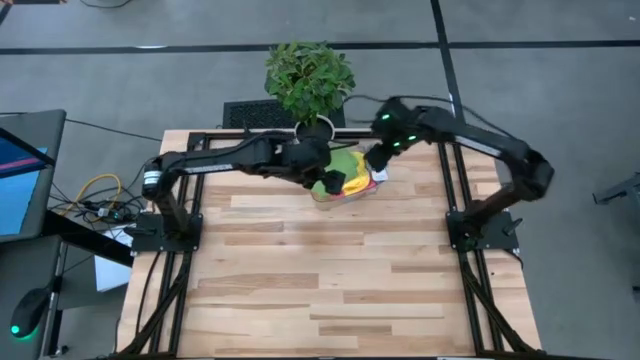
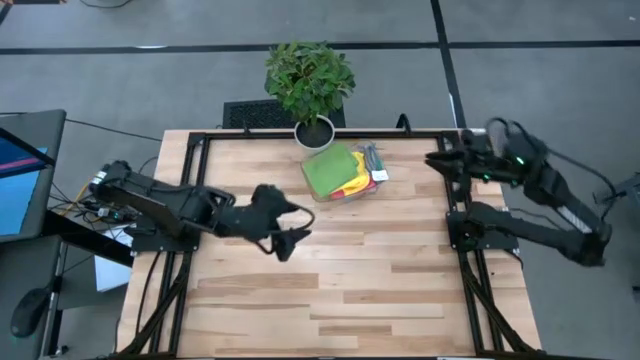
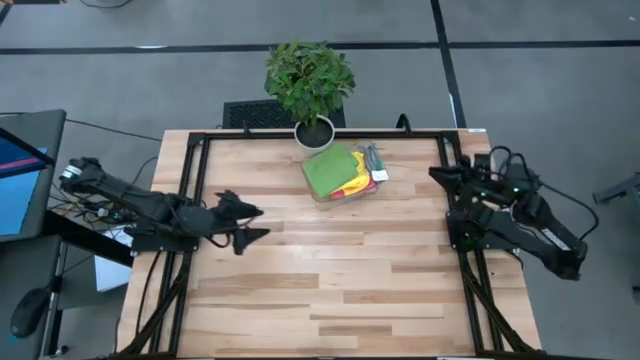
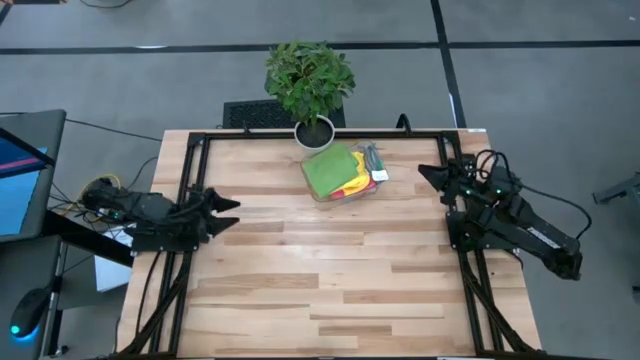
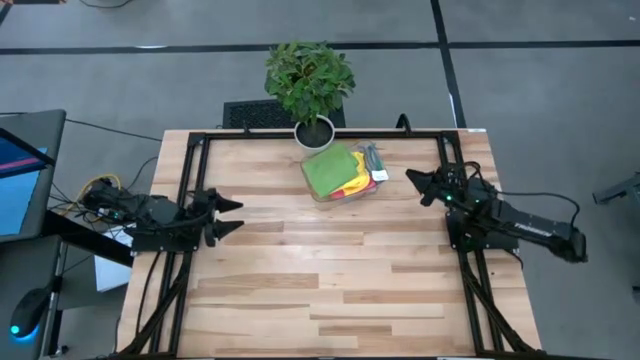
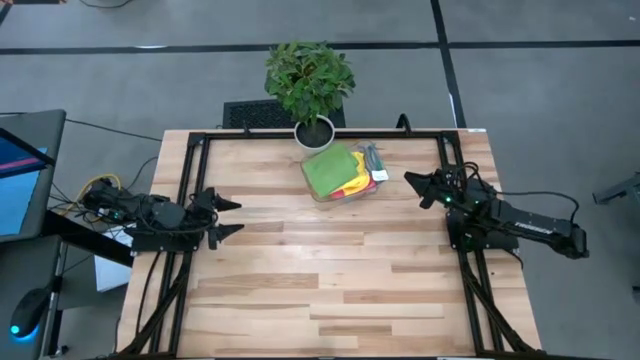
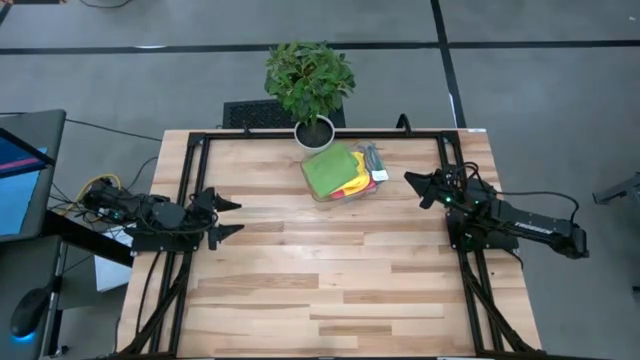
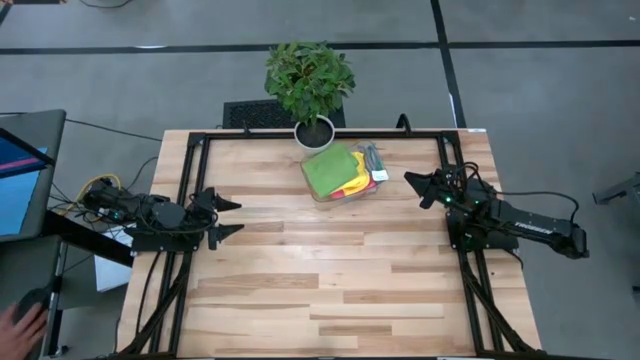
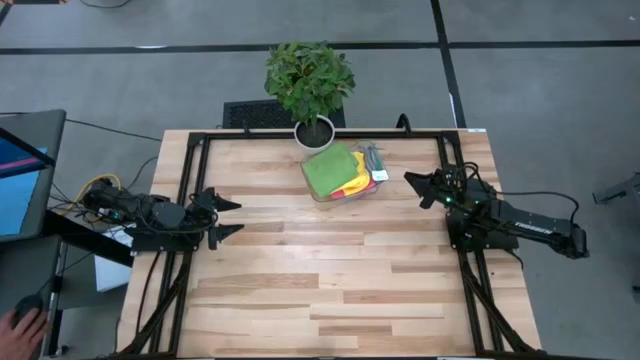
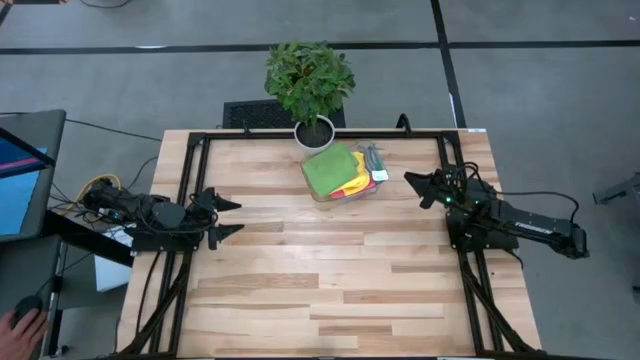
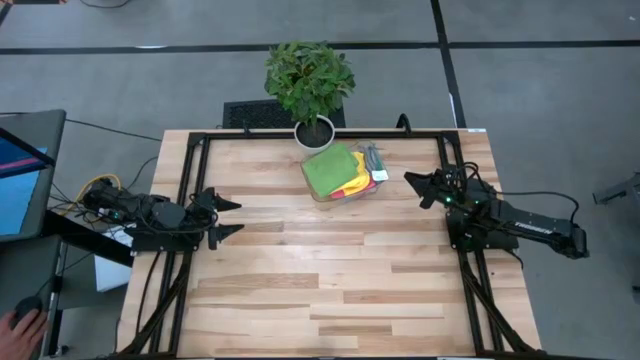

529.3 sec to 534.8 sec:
Task: Fold microfiber towels
Return to Home Position

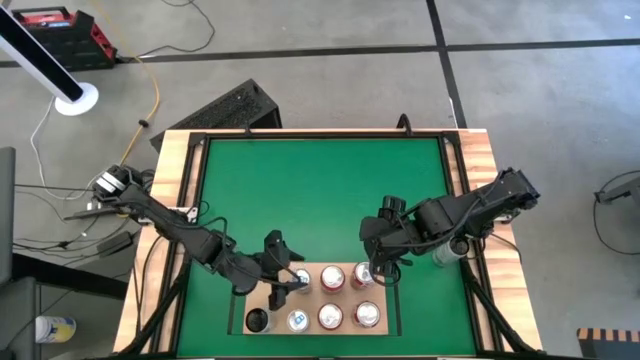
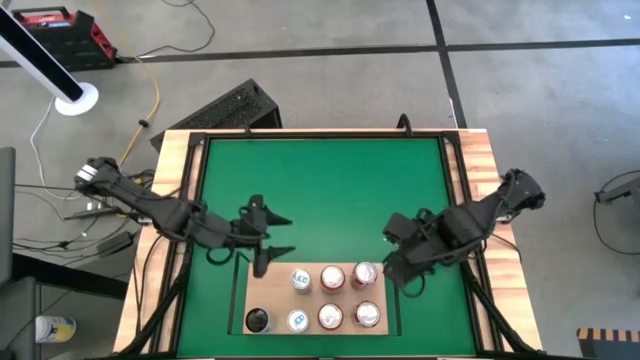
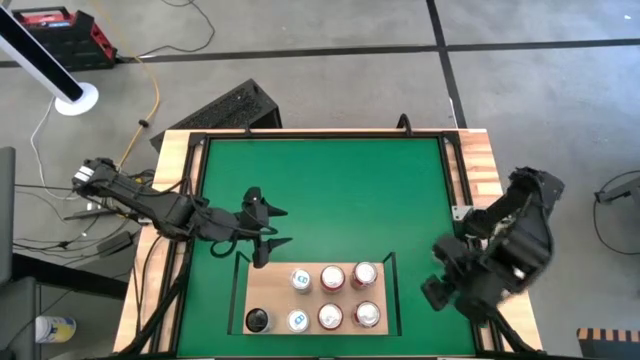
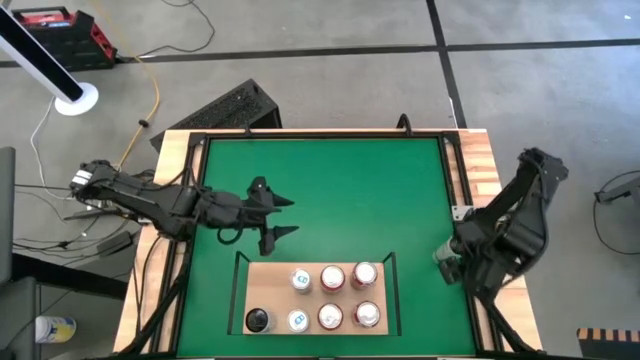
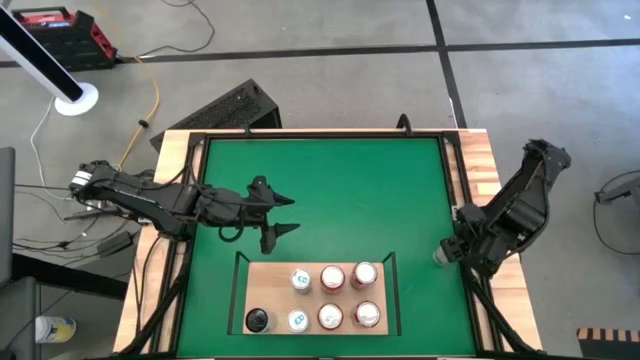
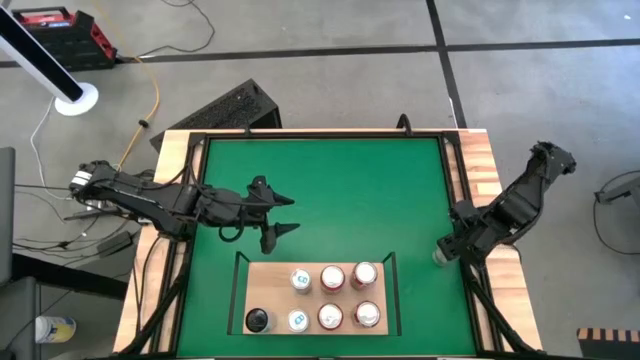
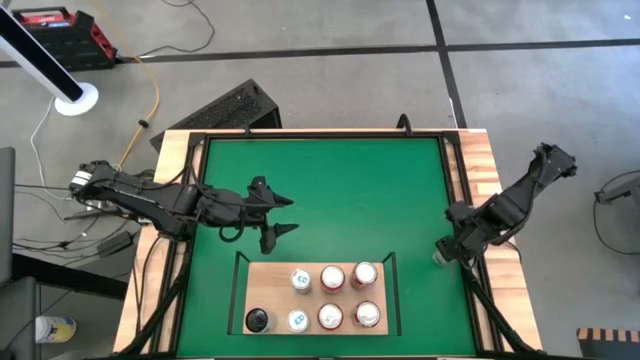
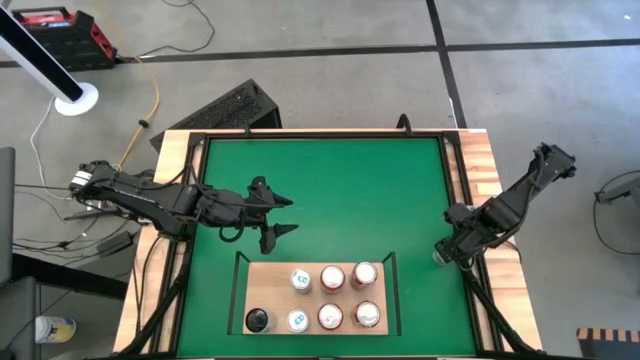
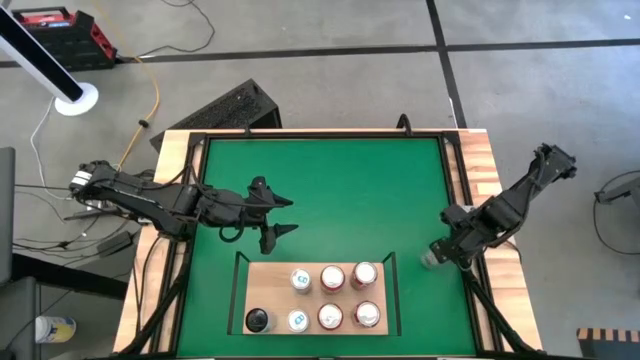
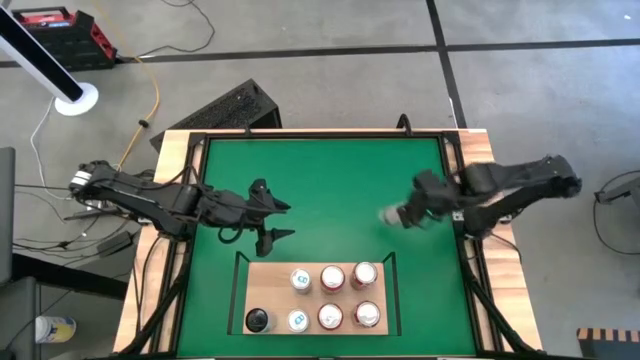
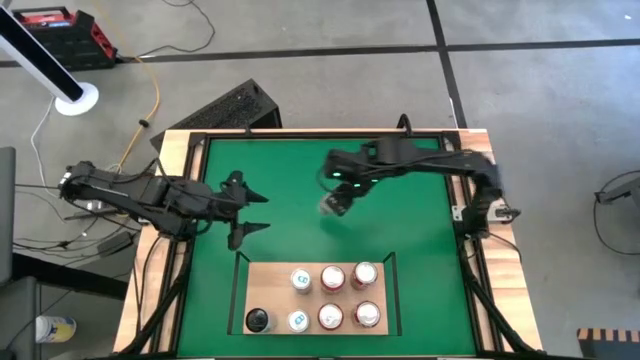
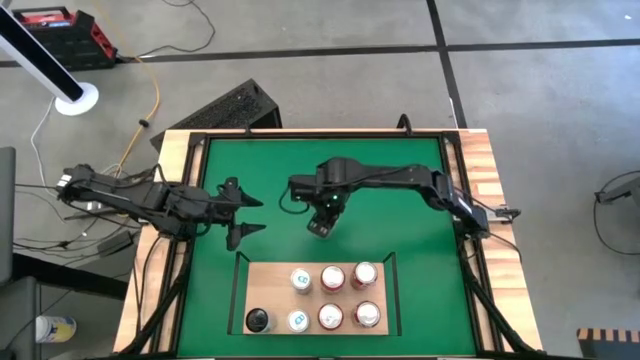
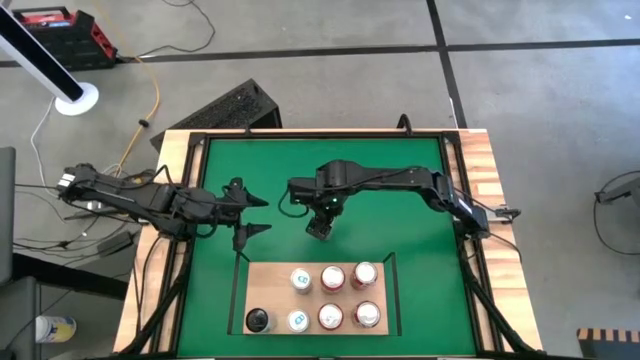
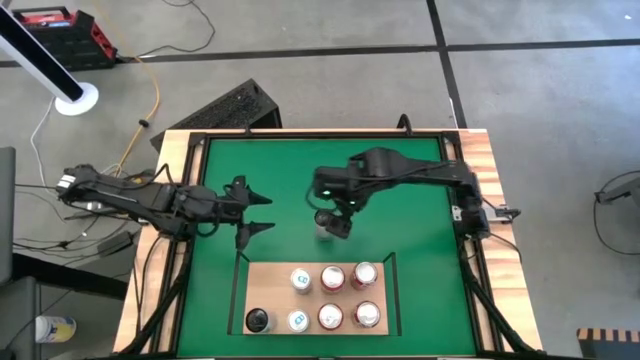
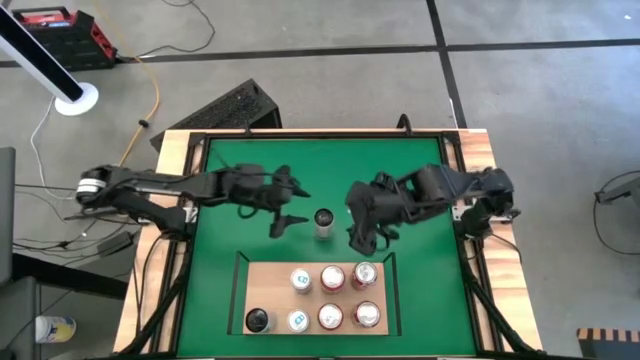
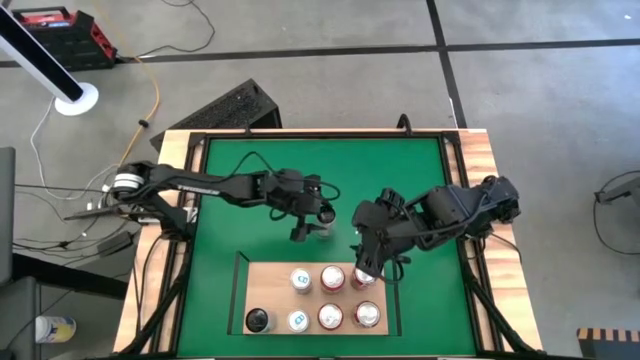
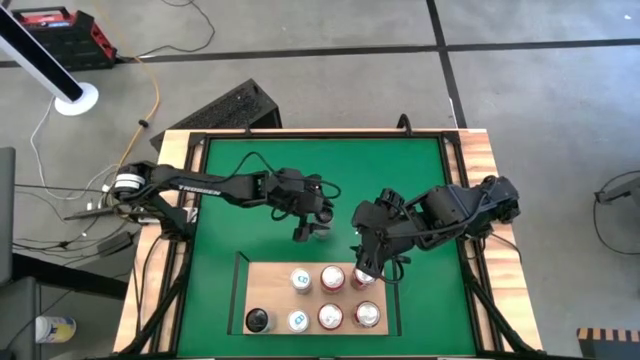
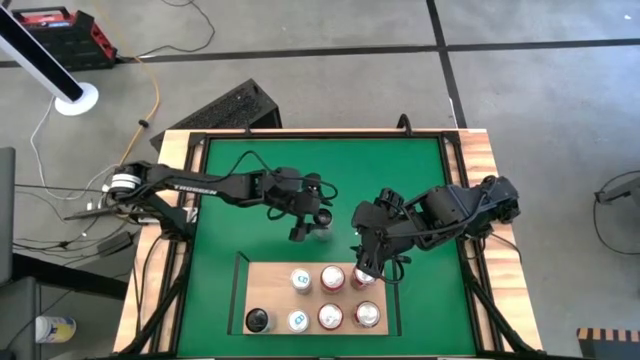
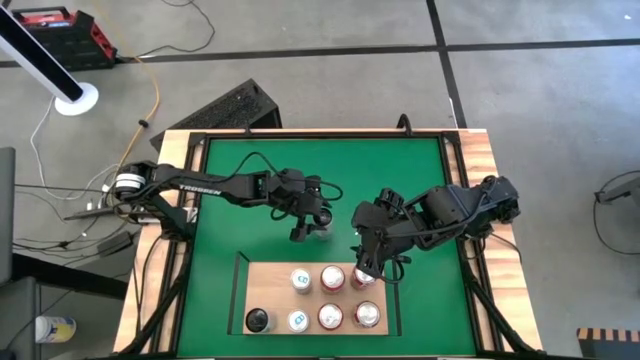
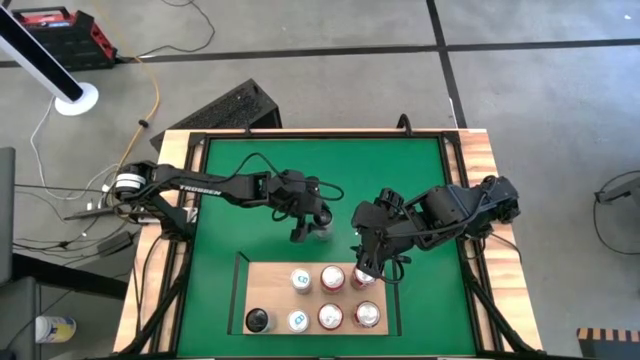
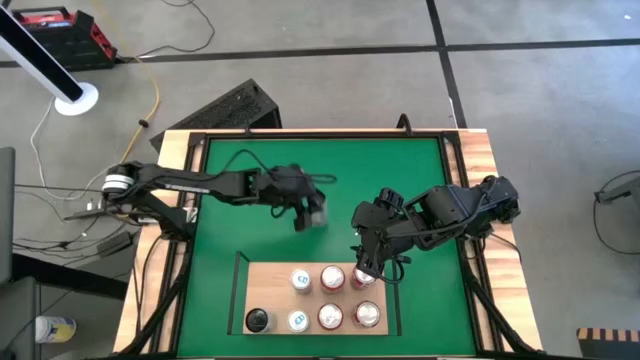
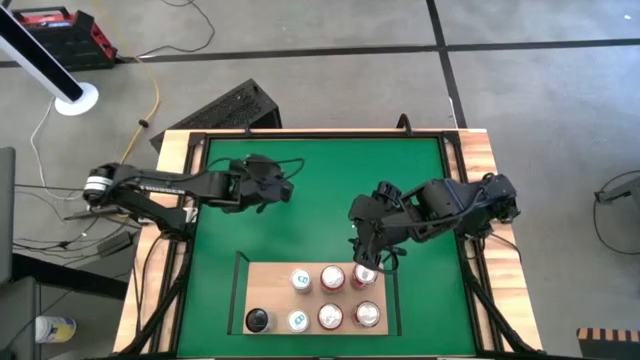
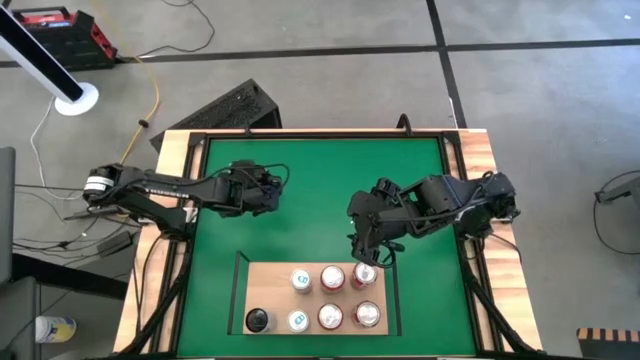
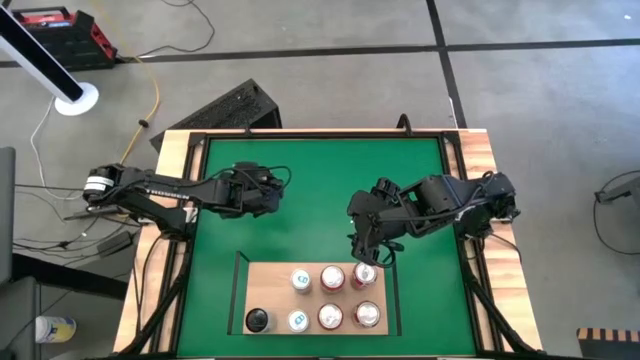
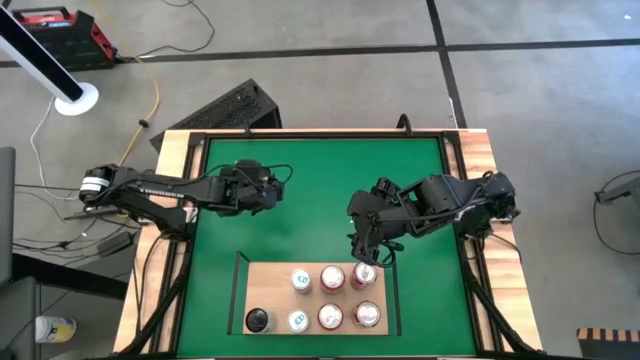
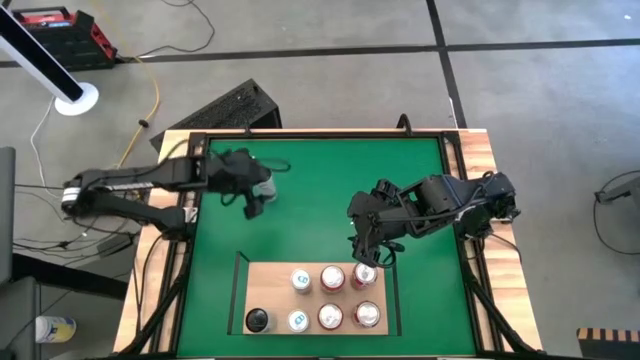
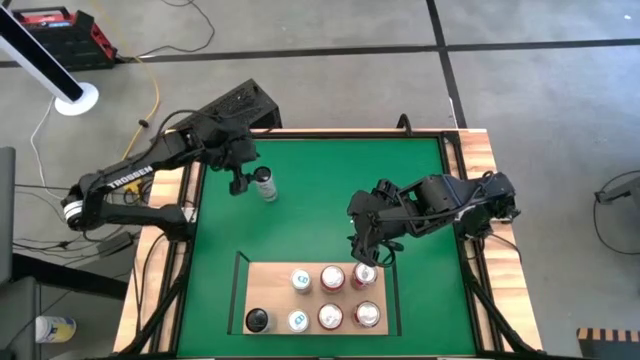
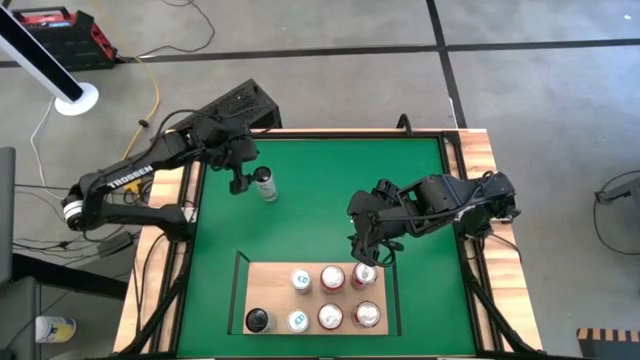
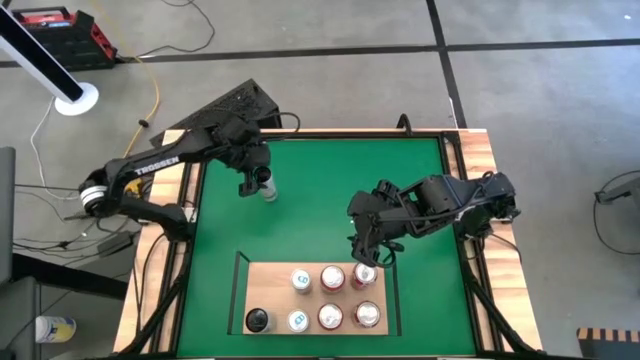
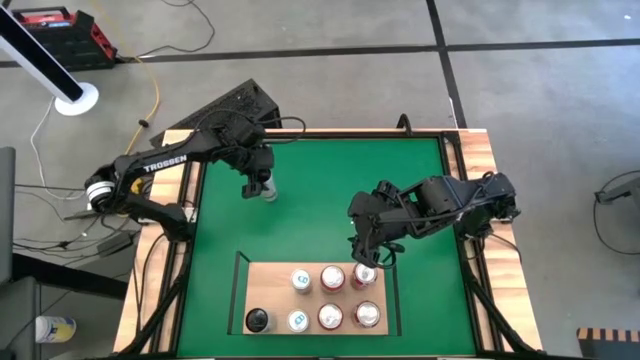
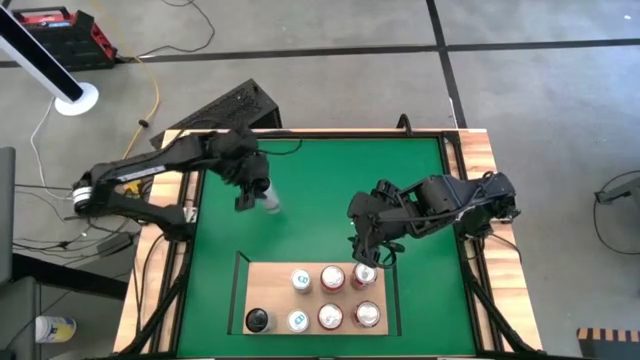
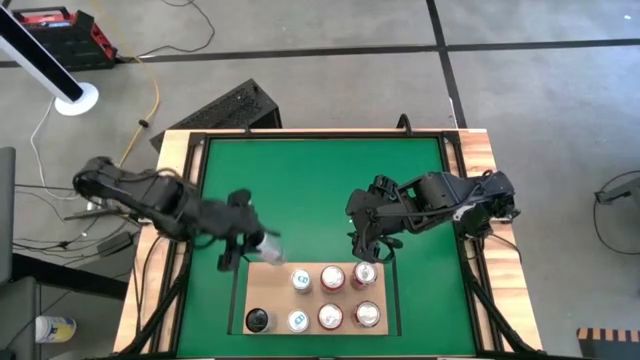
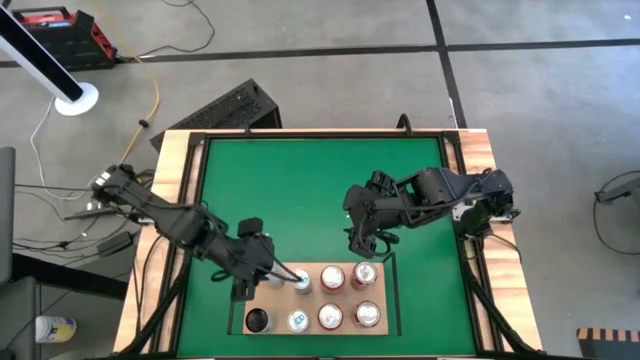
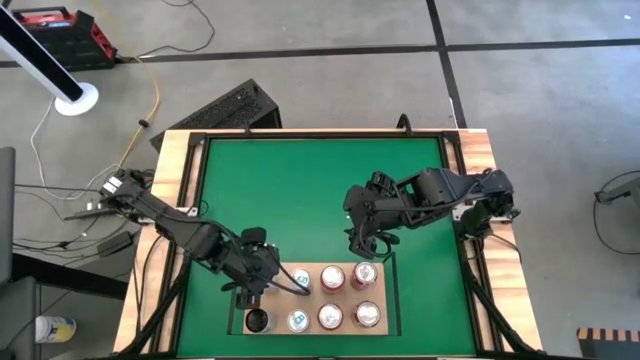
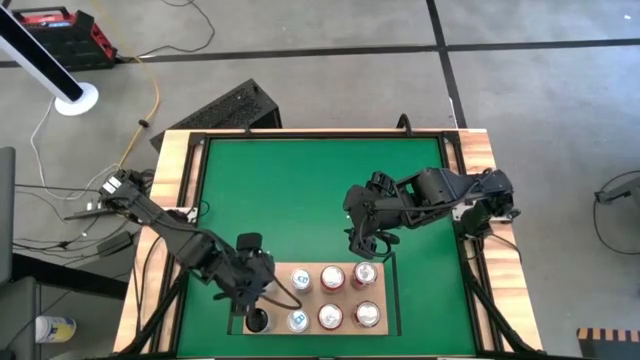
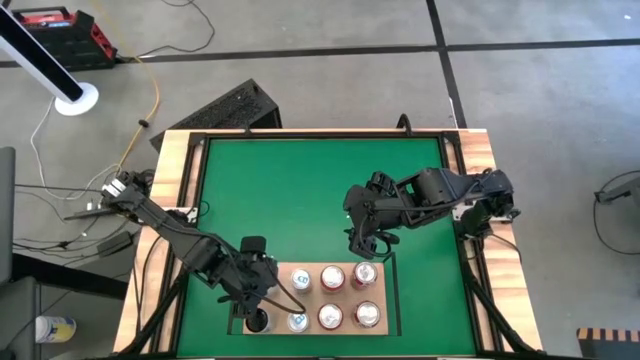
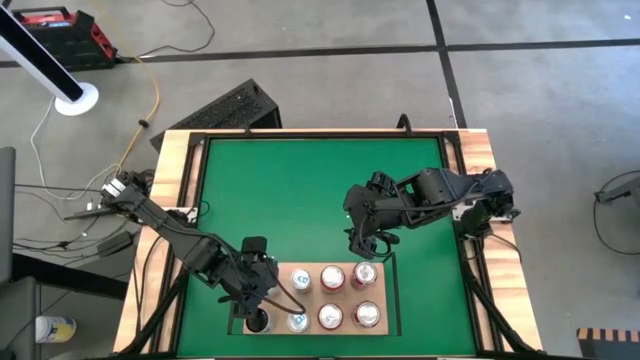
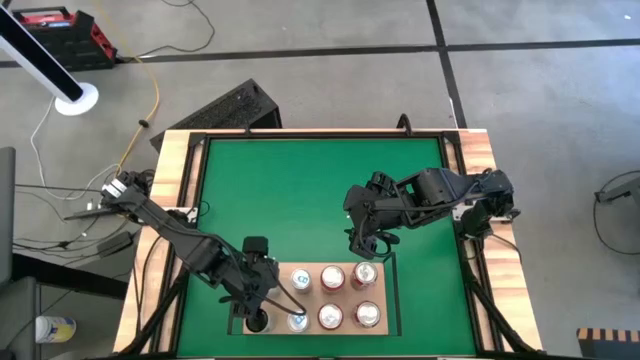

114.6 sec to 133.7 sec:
Task: Place canned beverage on shelf
Put the white soda can on the shelf aligned with the other white soda can
